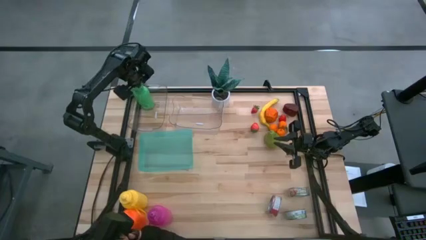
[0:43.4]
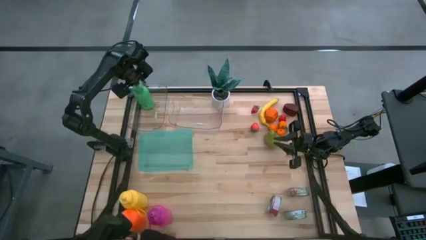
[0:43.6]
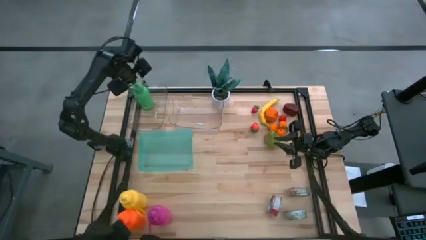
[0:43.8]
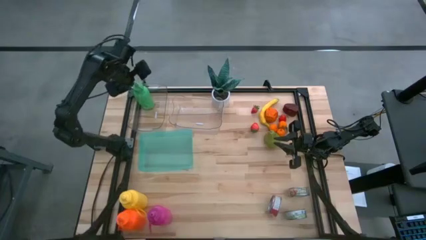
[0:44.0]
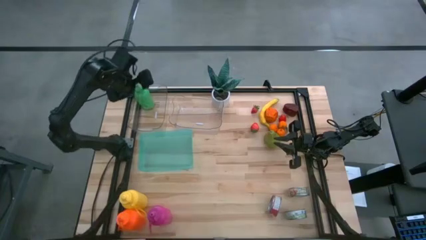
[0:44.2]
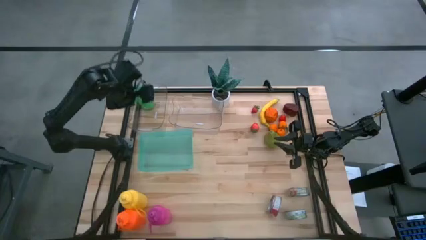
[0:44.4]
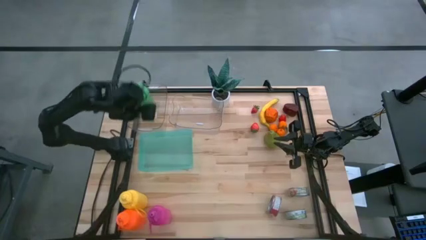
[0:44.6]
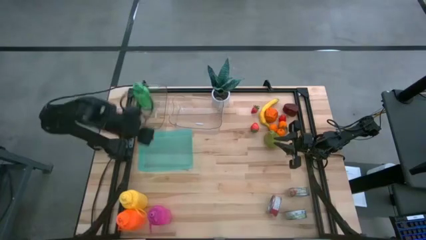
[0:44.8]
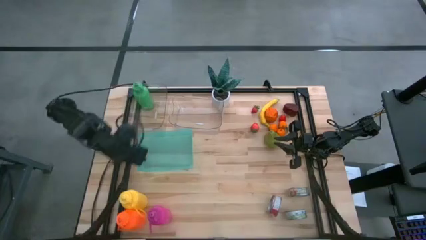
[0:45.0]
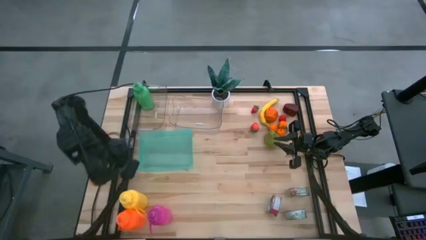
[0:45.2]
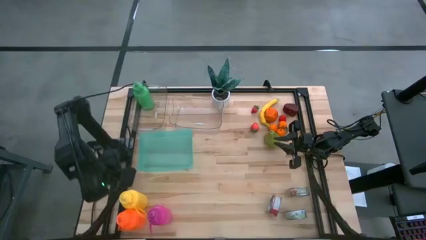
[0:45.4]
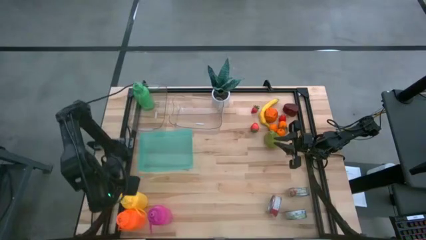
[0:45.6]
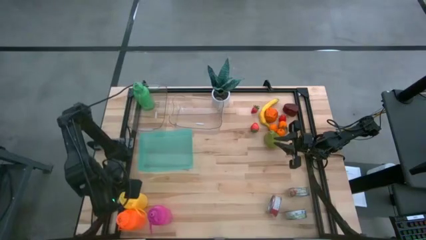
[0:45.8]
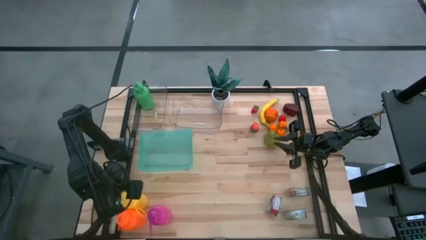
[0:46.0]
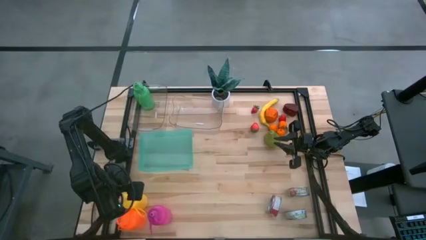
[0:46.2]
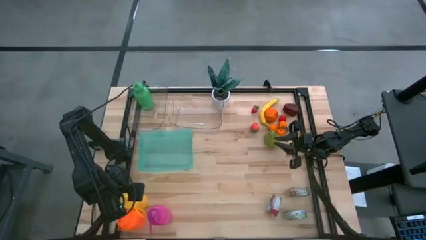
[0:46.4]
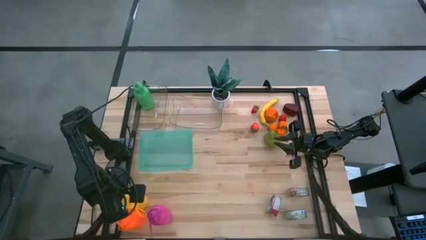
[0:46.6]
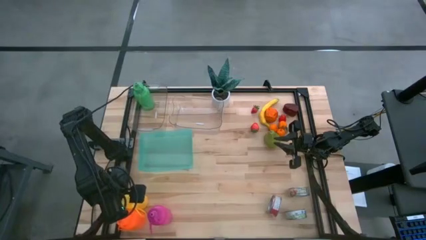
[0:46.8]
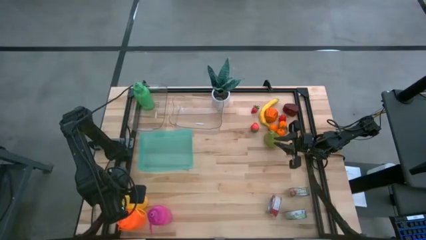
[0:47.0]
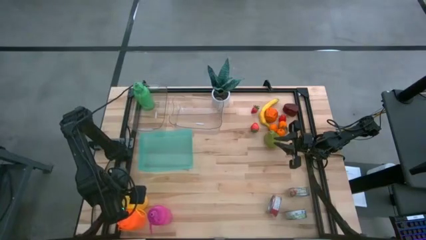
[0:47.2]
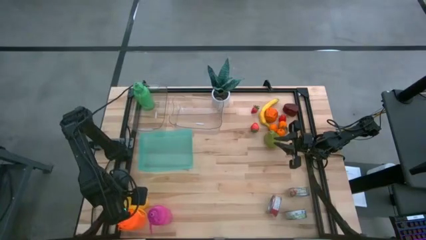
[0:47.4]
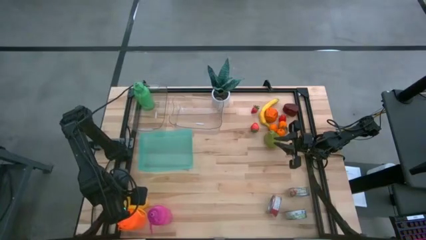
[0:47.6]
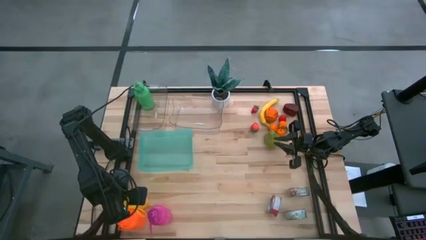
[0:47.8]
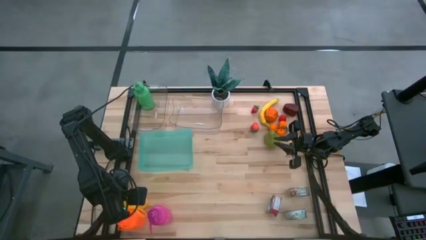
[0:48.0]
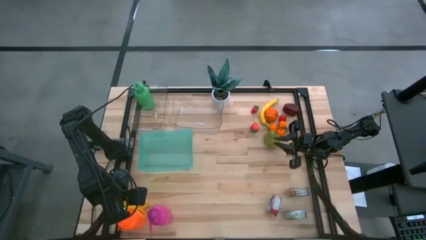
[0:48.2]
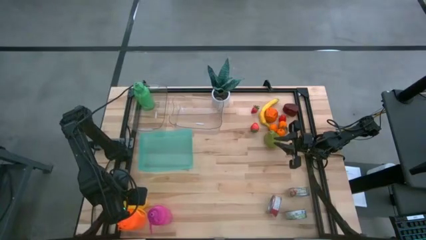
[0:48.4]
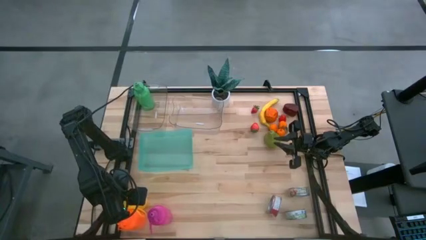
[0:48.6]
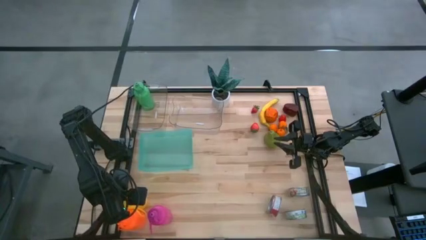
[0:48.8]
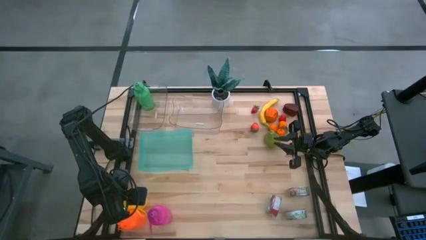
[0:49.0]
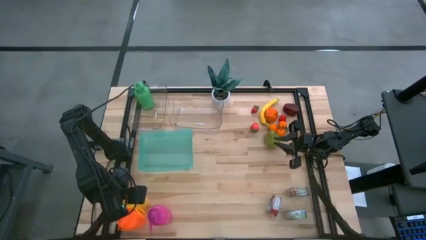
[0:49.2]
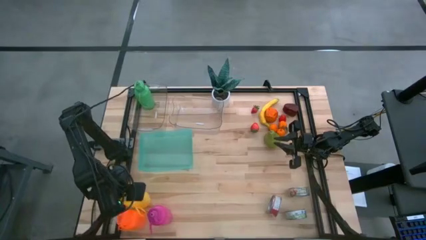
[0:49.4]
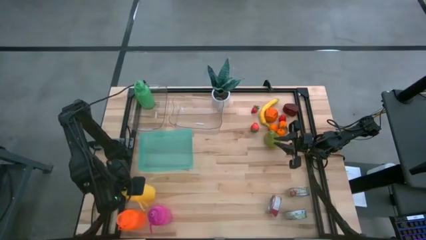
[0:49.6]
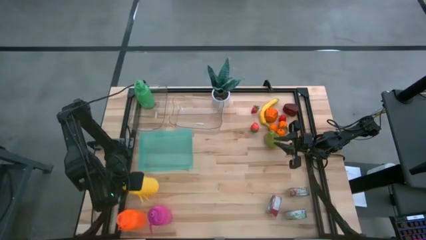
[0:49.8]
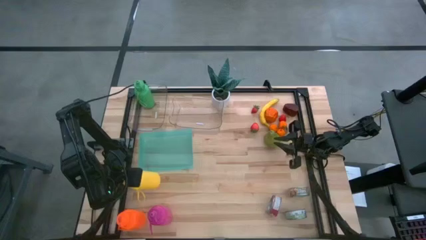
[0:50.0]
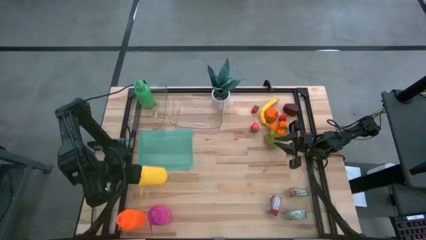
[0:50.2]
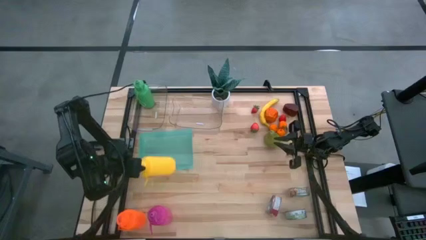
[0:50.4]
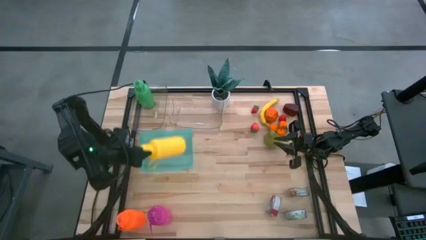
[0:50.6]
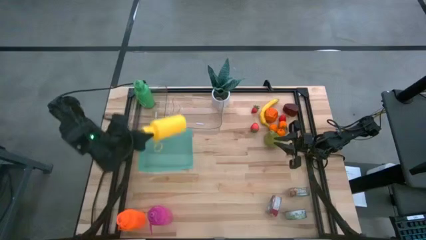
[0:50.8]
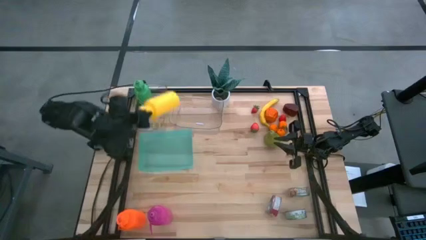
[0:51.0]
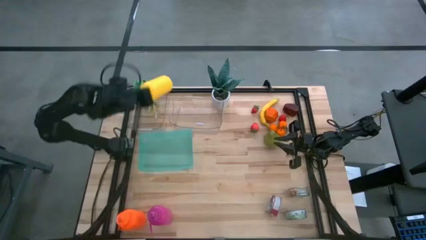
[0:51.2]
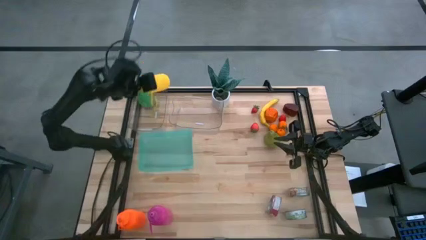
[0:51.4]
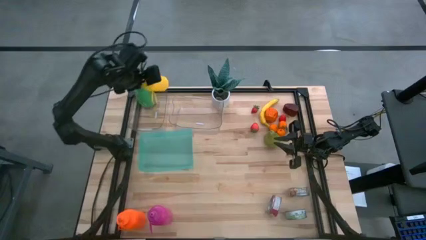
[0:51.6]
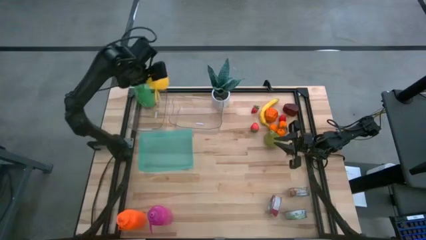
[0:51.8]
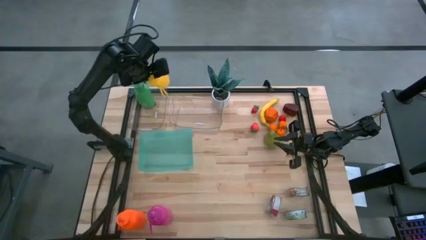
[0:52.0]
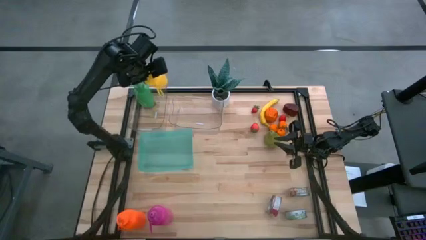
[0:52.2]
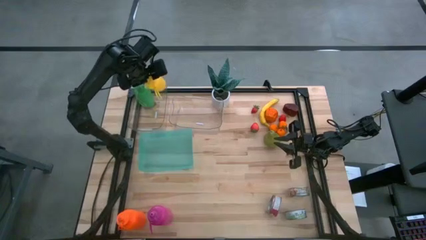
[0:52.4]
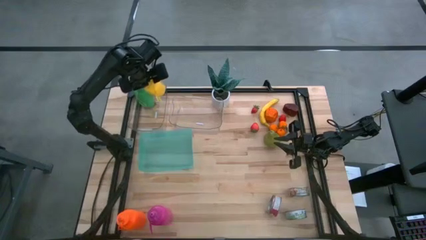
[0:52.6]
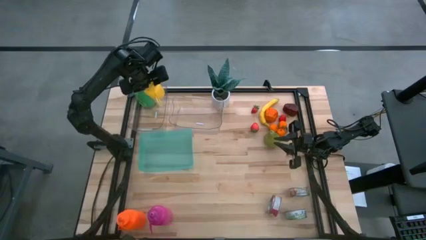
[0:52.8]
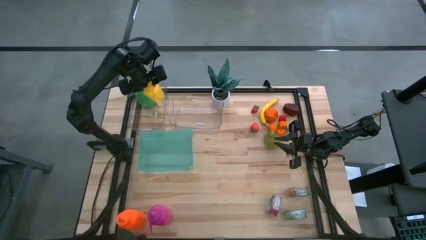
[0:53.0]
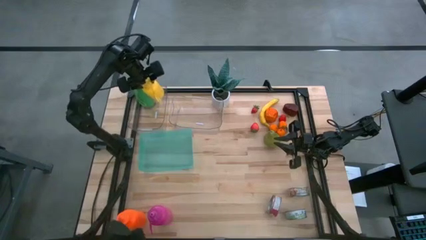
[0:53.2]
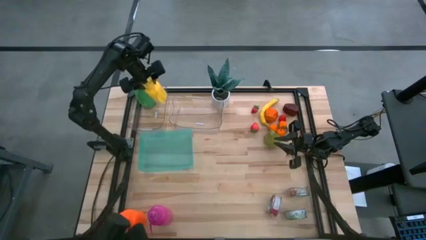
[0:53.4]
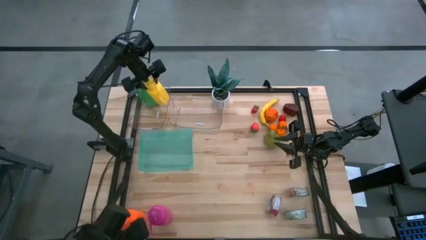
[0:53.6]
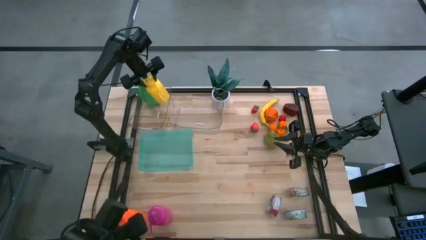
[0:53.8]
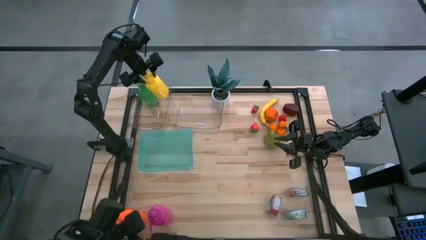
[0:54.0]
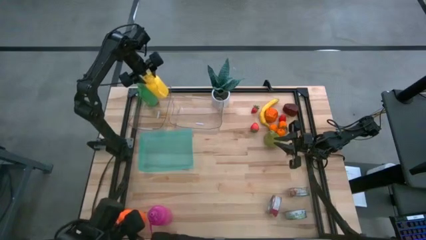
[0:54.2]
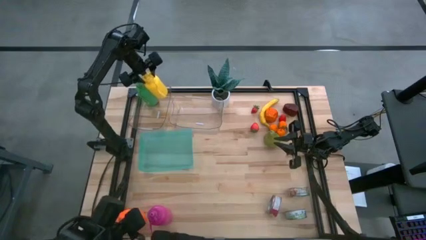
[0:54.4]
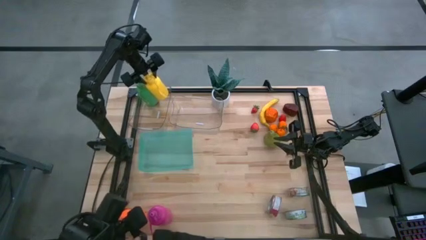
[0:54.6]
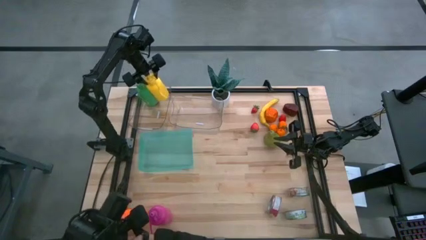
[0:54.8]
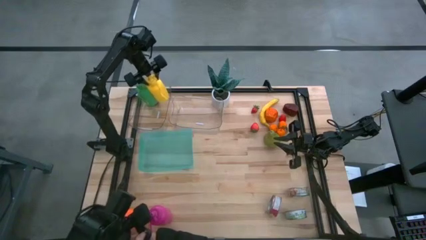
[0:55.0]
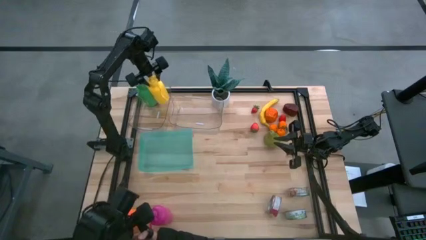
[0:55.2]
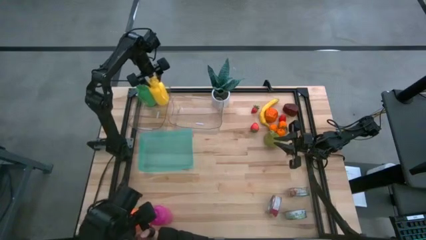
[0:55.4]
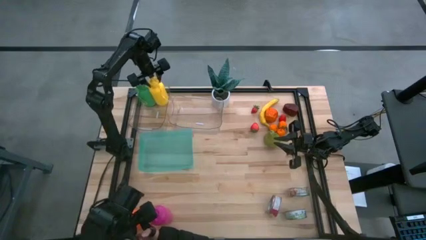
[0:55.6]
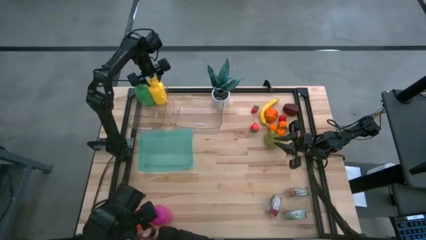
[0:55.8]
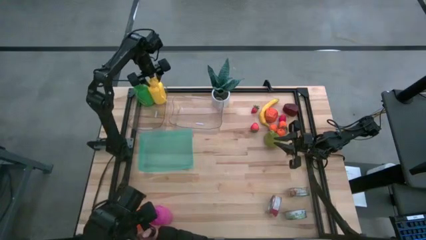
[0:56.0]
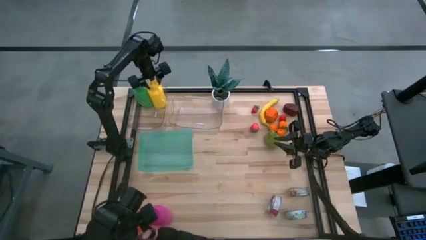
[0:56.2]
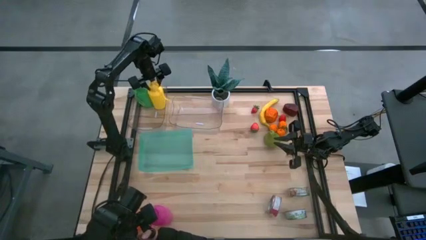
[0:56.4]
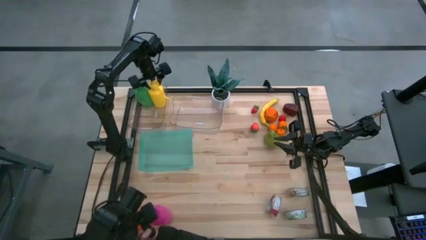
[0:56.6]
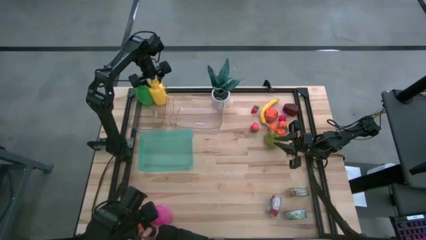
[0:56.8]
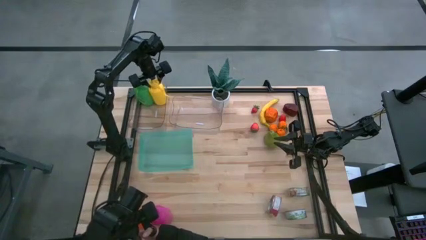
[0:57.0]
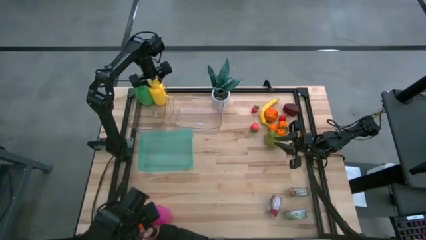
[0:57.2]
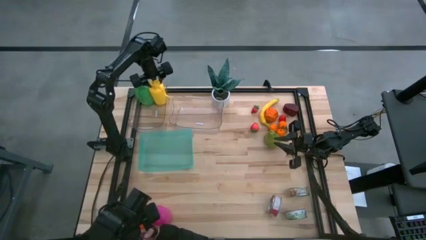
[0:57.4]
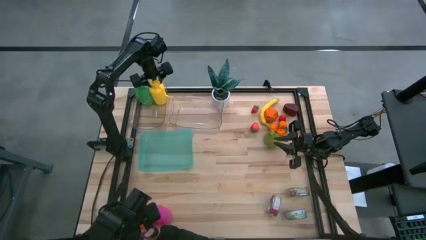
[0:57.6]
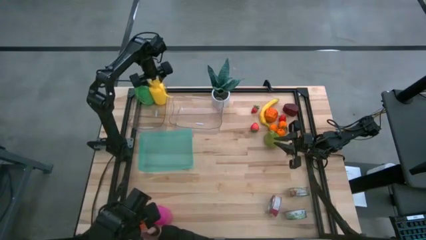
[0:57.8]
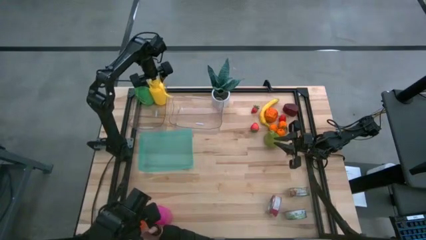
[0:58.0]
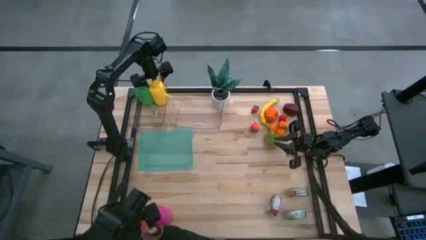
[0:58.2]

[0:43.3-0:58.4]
Task: Pick & Place Food Item
Put the yellow water bottle into the left transparent bin
